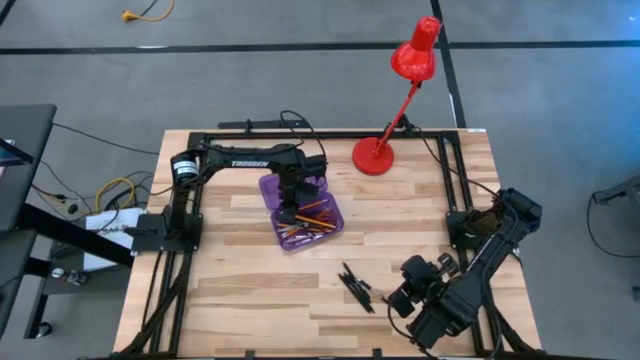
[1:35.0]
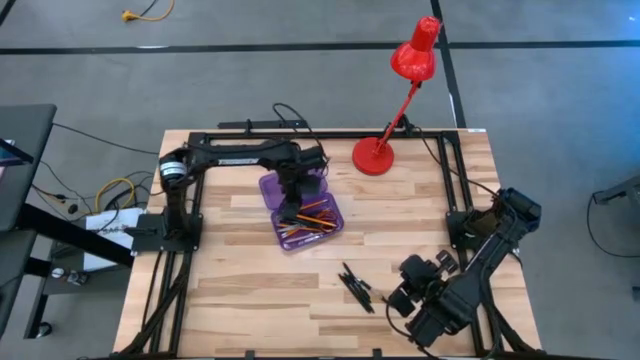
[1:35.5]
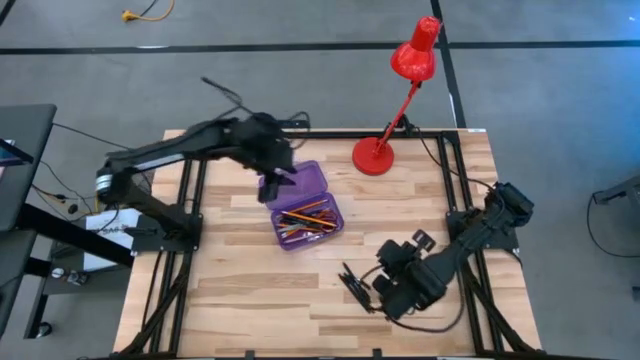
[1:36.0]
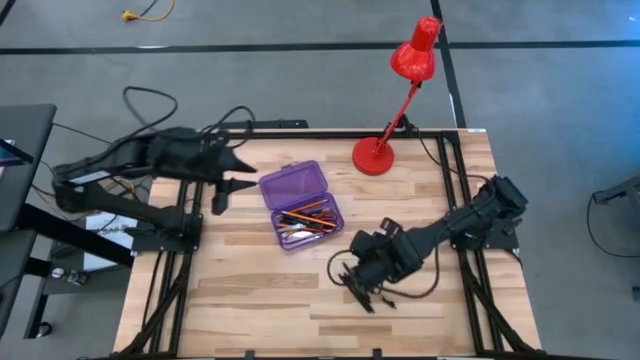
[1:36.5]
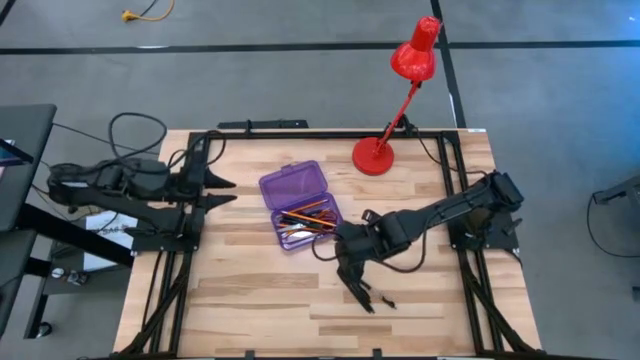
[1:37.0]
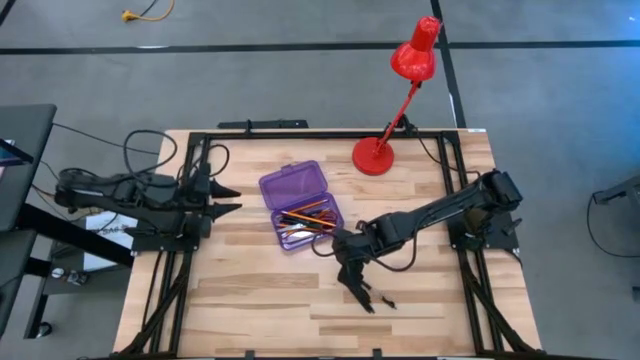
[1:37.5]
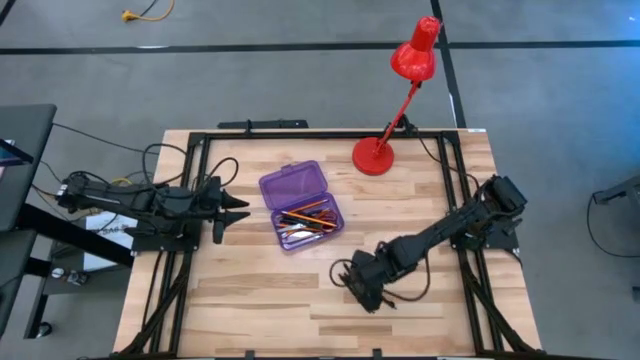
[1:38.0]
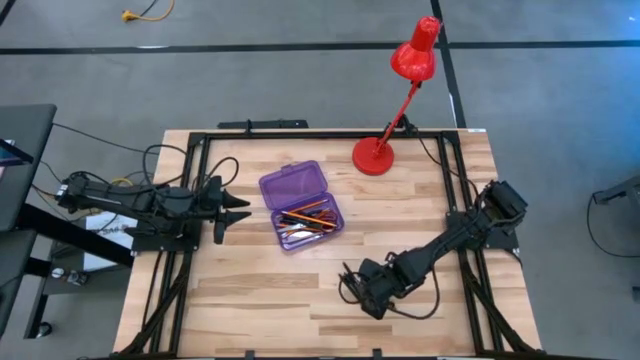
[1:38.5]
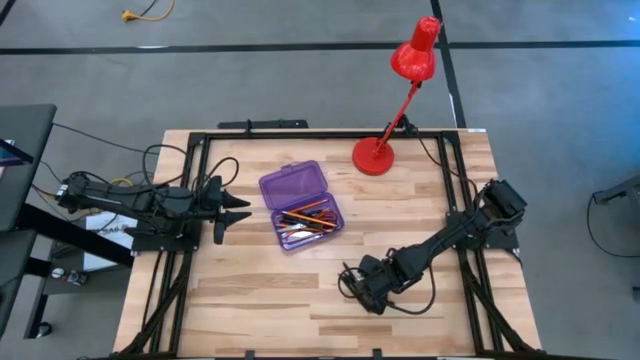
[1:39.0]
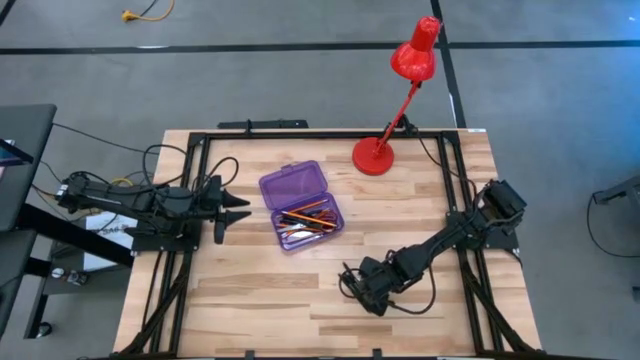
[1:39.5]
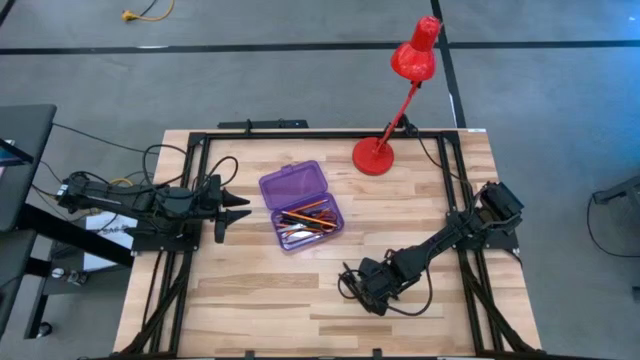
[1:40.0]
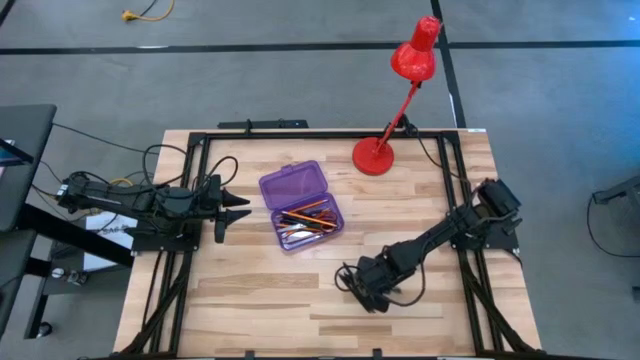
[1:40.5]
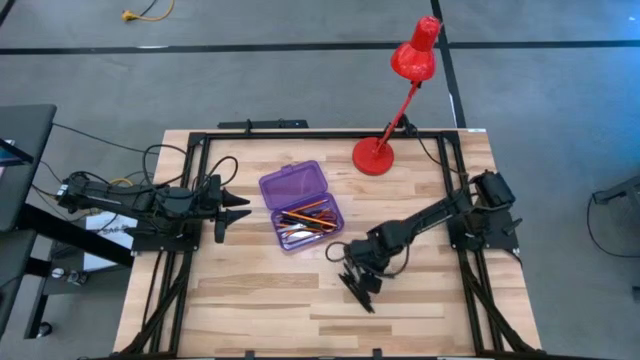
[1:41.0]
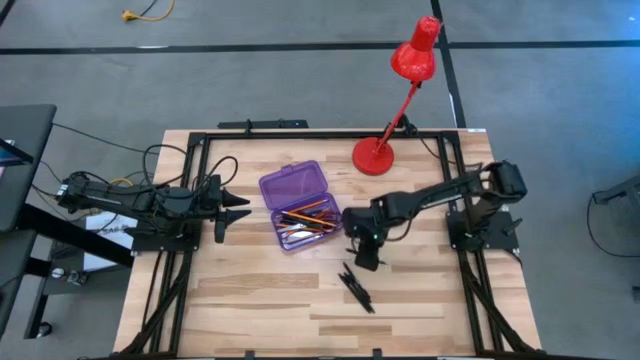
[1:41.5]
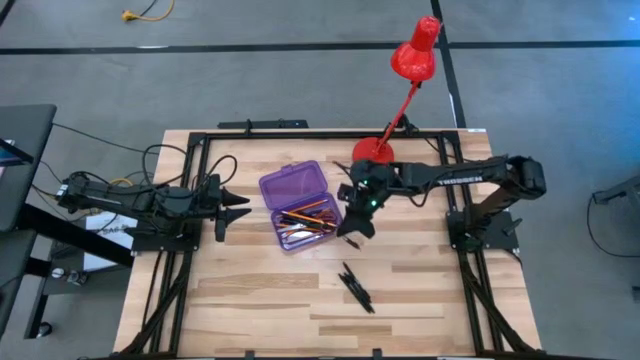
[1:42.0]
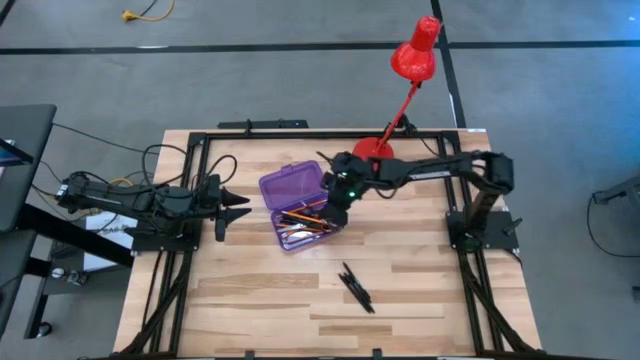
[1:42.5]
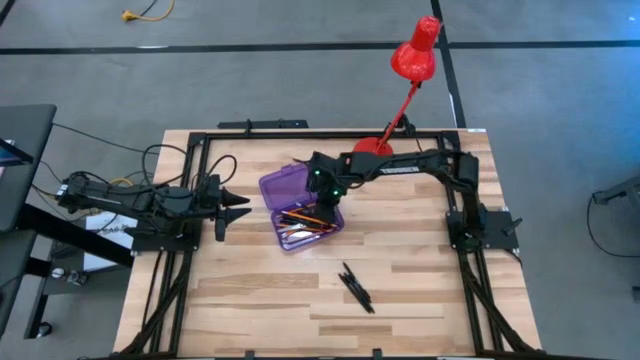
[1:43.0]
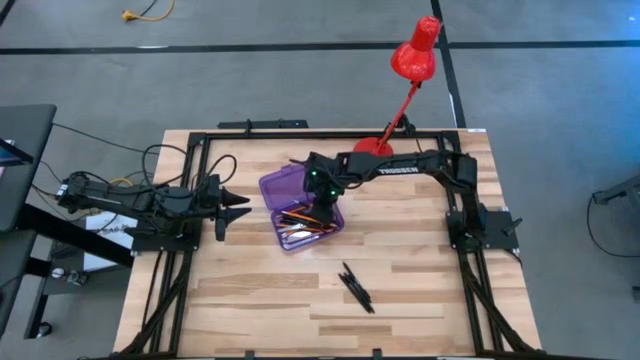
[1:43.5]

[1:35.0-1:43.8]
Task: Pick & place school supplies into a supply box
Put the transparent pen into the purple supply box

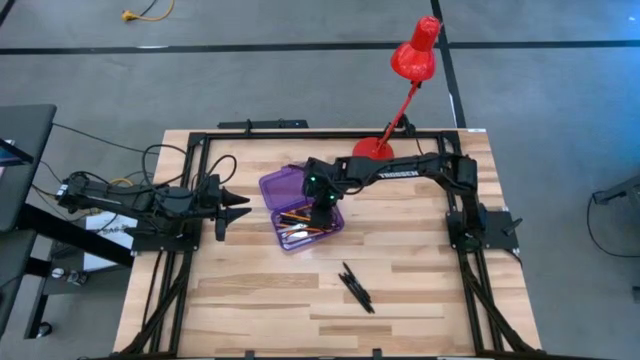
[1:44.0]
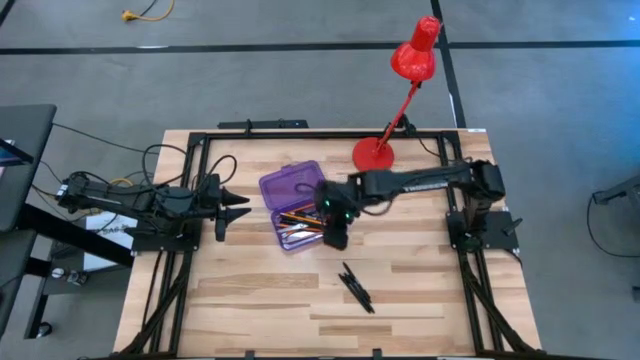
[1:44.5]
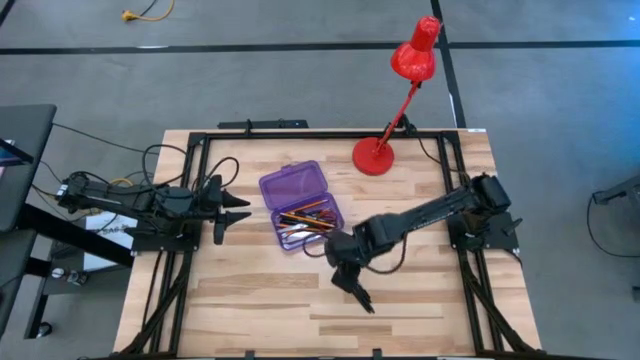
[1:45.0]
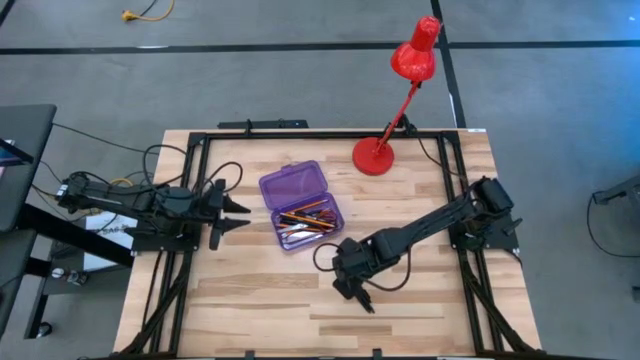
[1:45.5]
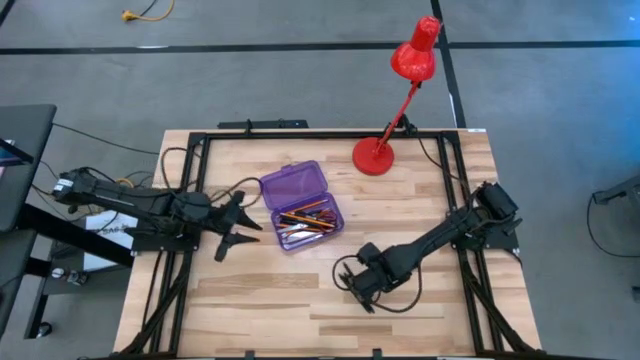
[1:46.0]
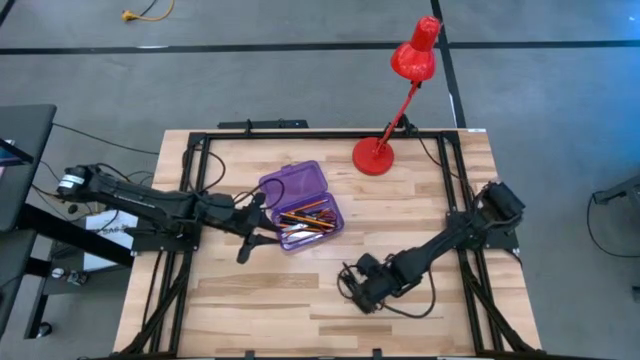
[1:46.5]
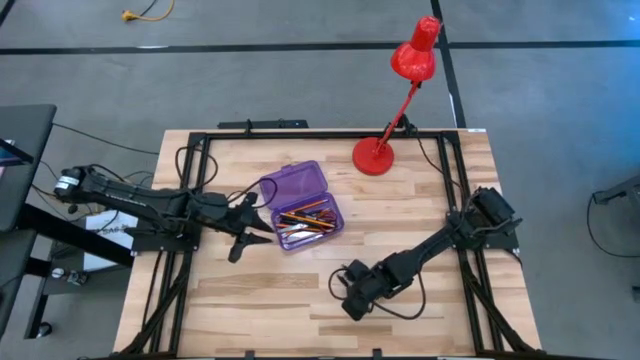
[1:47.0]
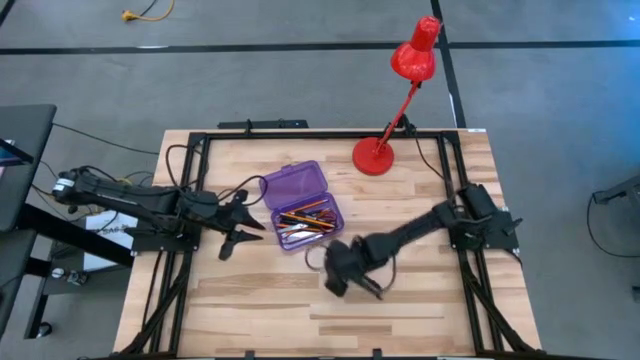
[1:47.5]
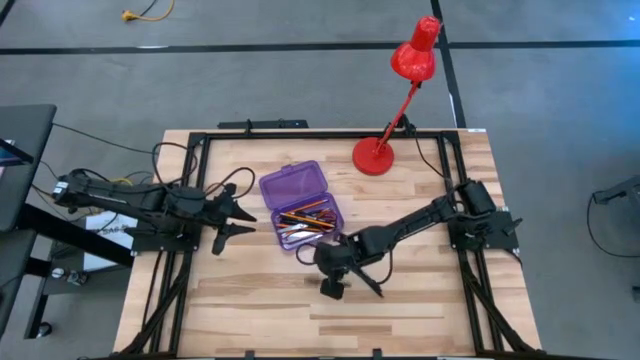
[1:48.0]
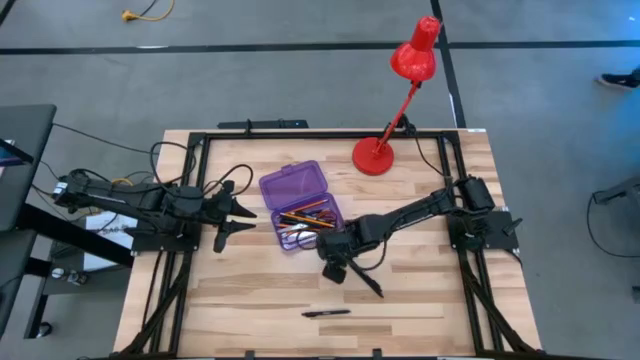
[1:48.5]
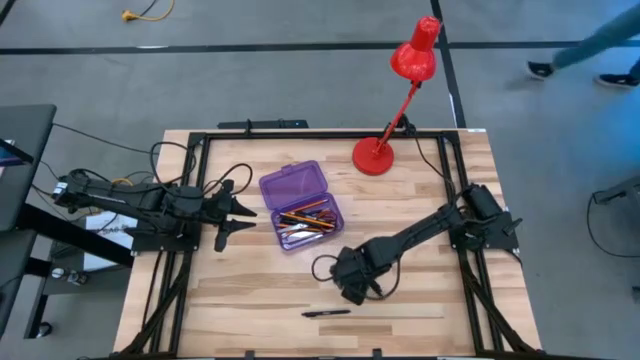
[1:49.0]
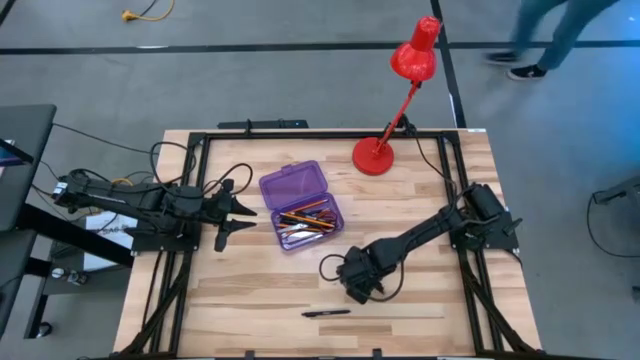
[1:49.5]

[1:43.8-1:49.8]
Put the black pen into the purple supply box

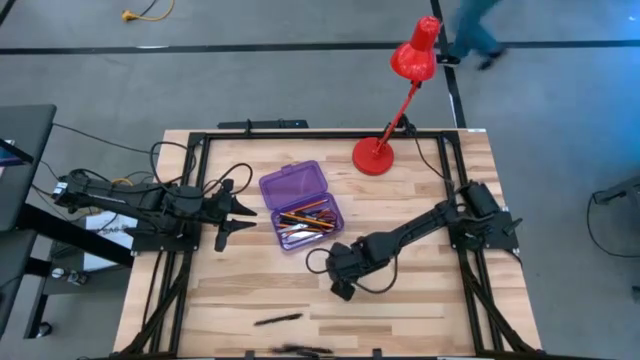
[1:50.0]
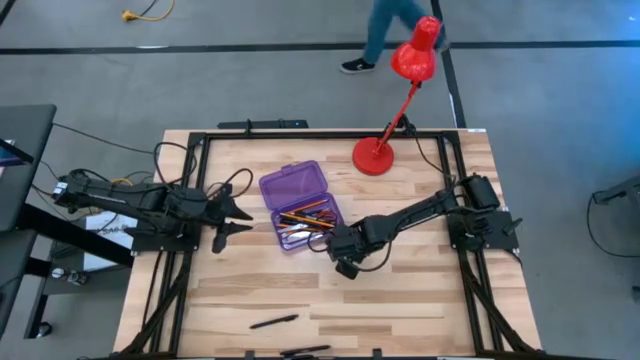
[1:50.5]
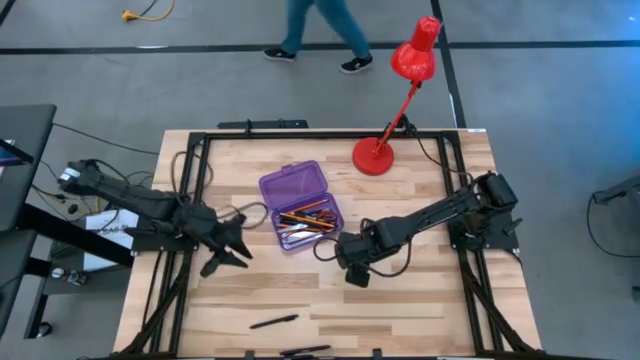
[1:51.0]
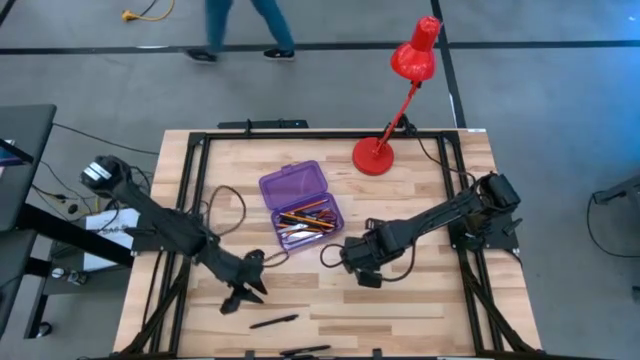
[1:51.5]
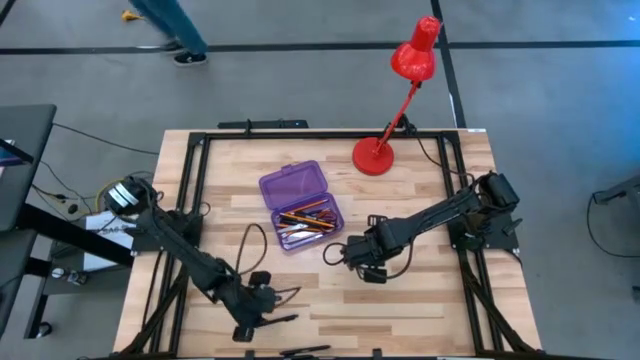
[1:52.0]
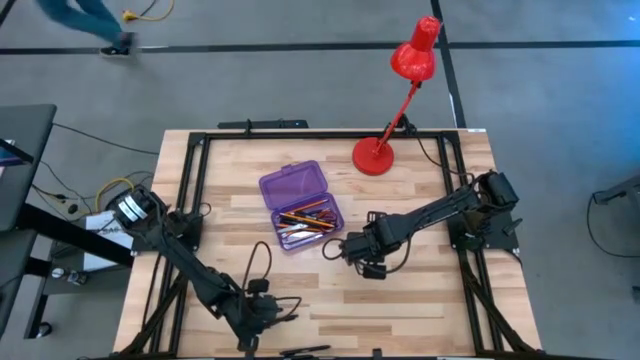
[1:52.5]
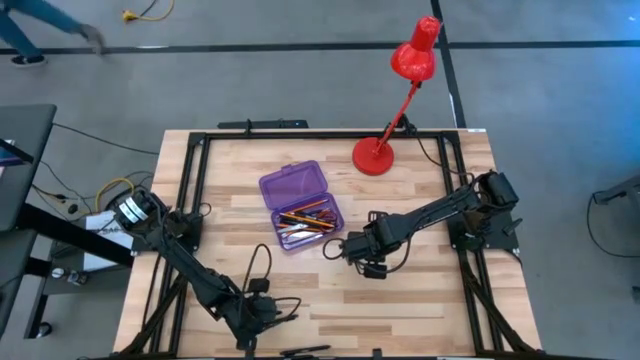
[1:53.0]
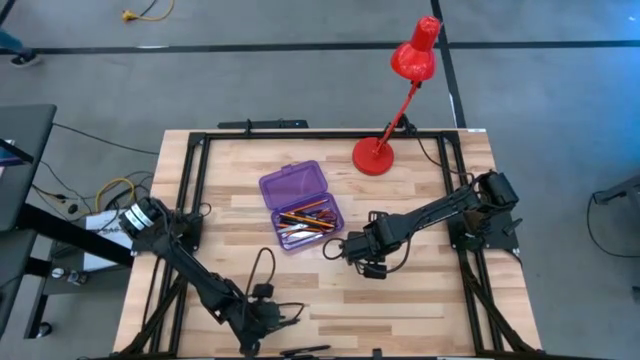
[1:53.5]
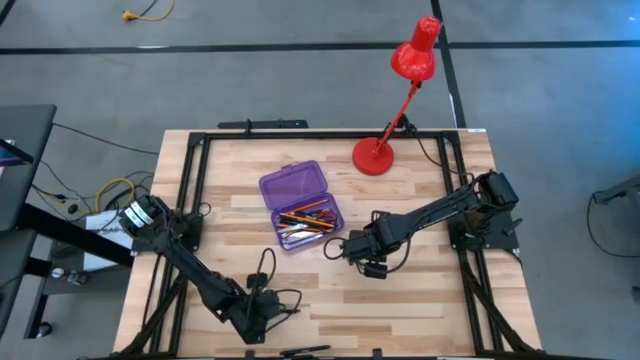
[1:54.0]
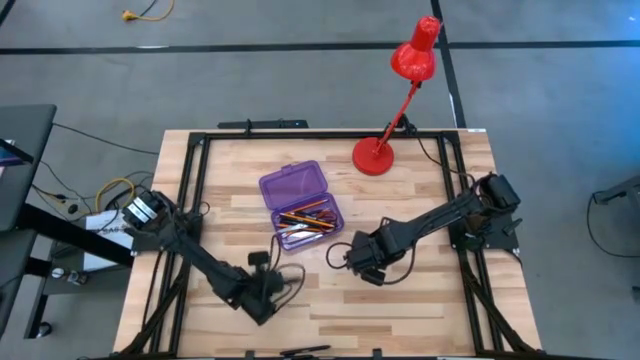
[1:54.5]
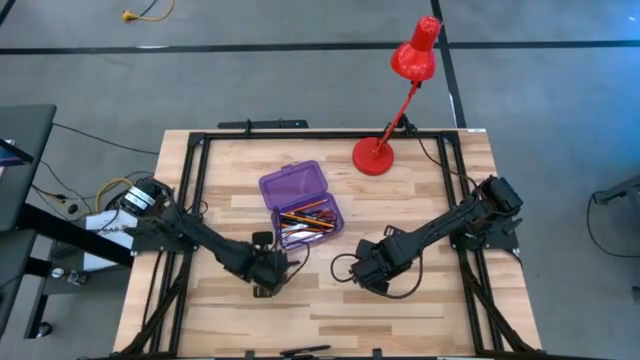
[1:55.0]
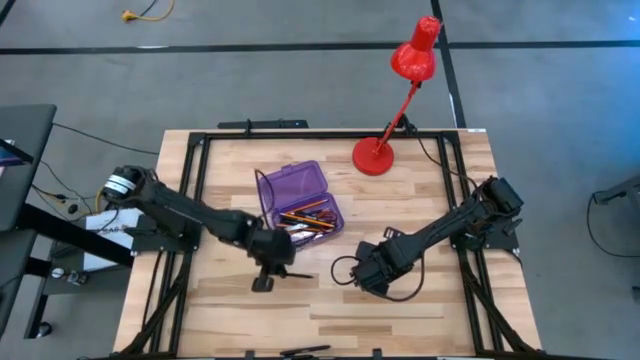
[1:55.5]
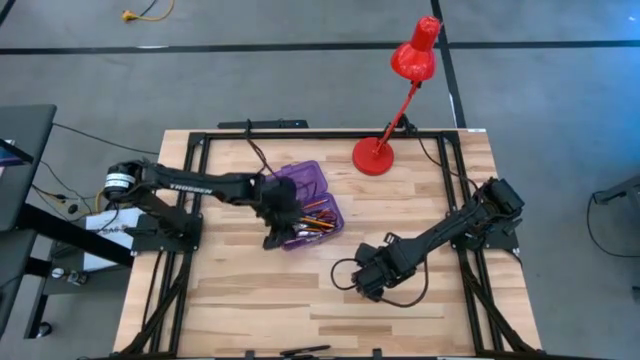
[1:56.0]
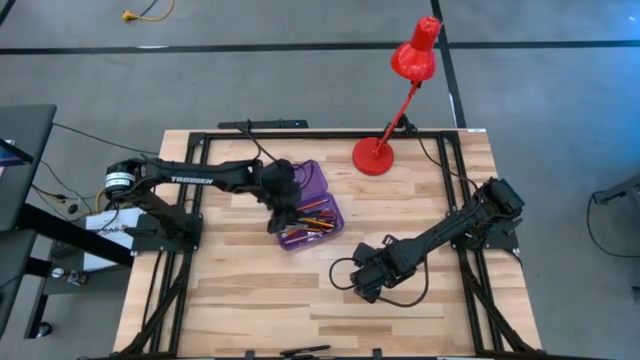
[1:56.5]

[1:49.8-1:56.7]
Put the black pen into the purple supply box
